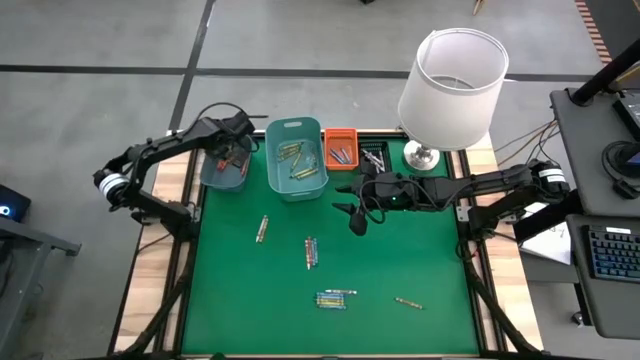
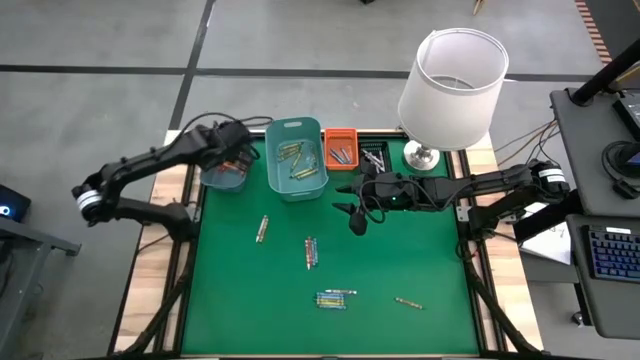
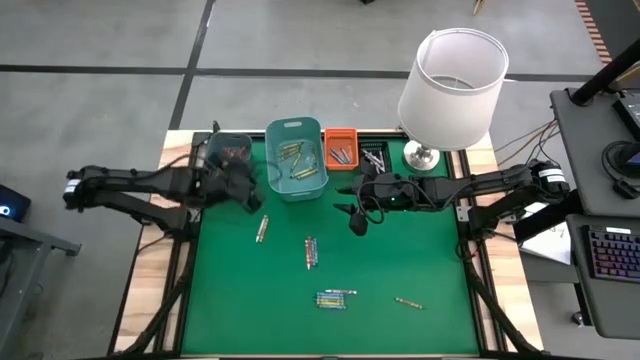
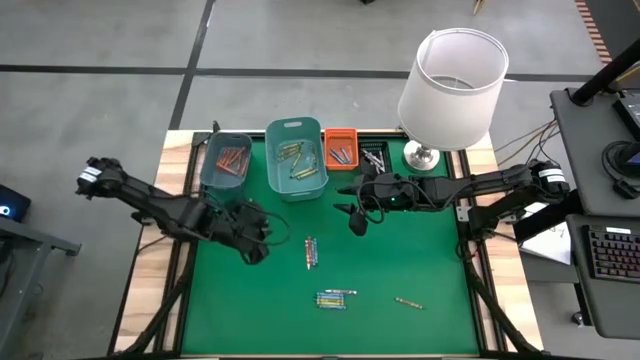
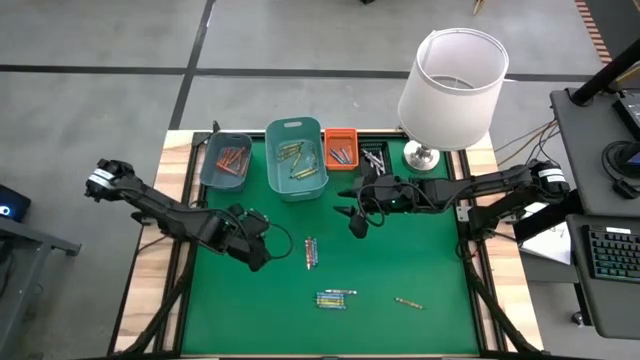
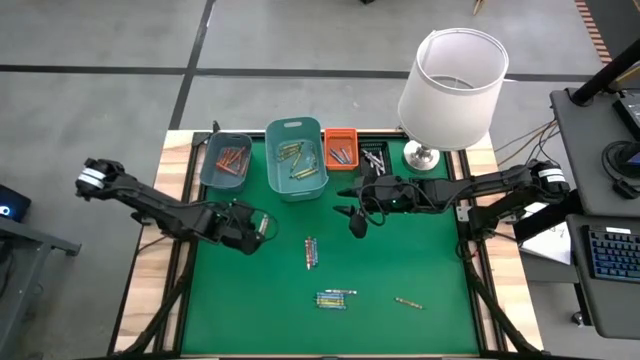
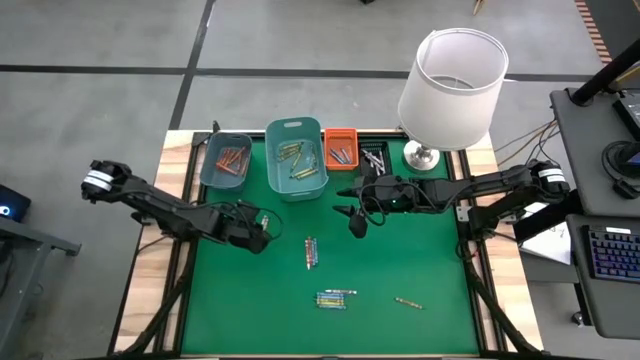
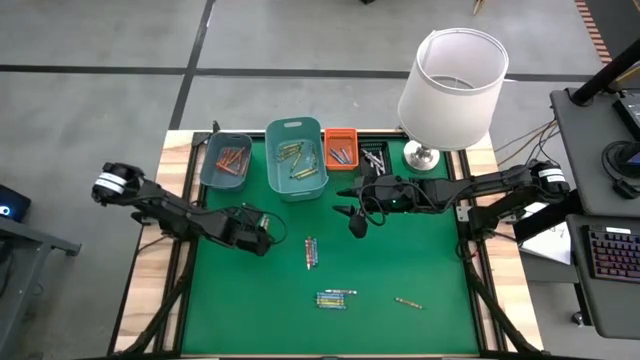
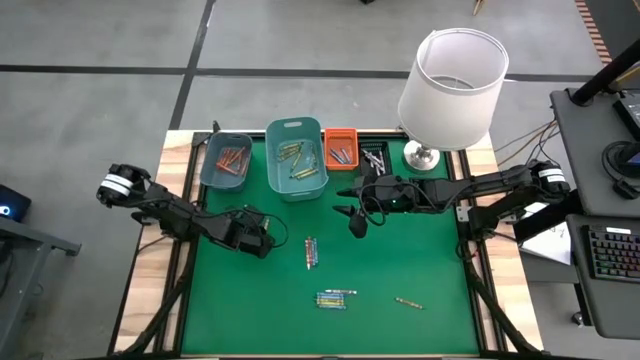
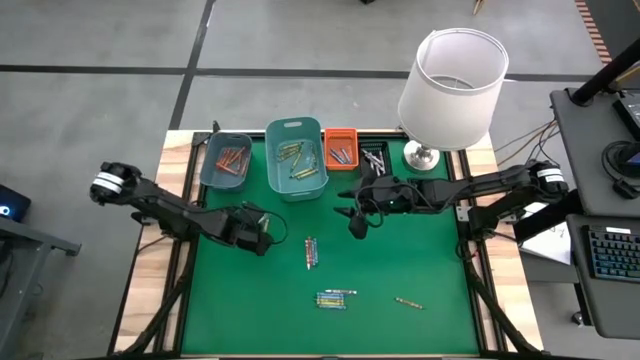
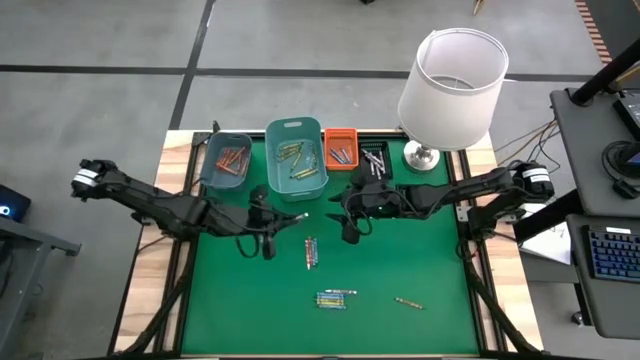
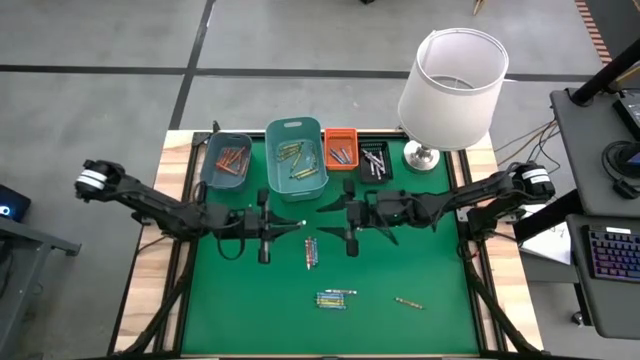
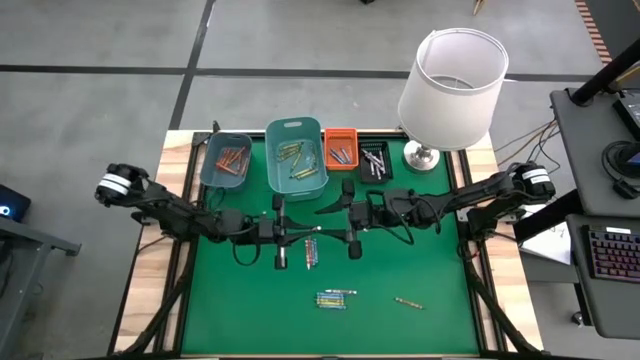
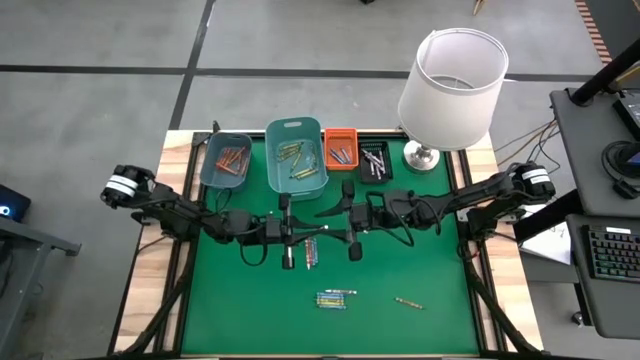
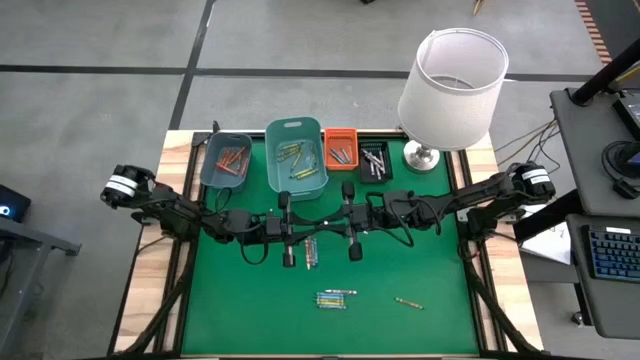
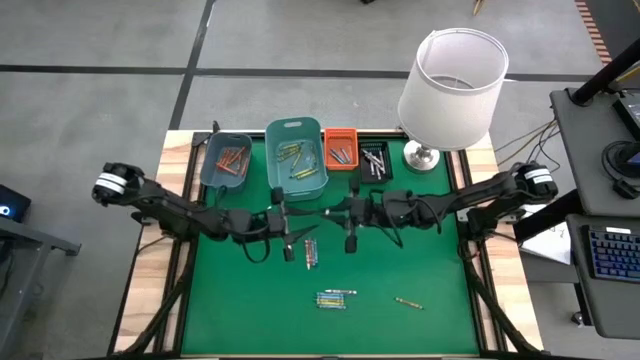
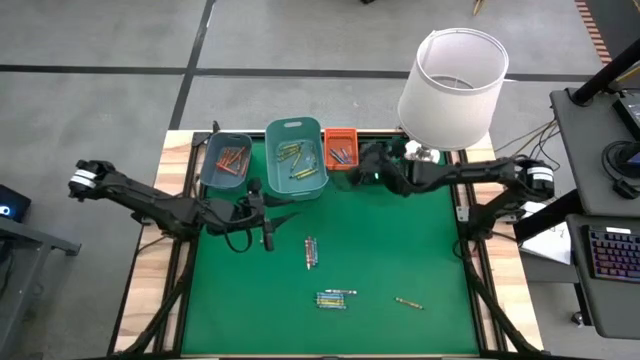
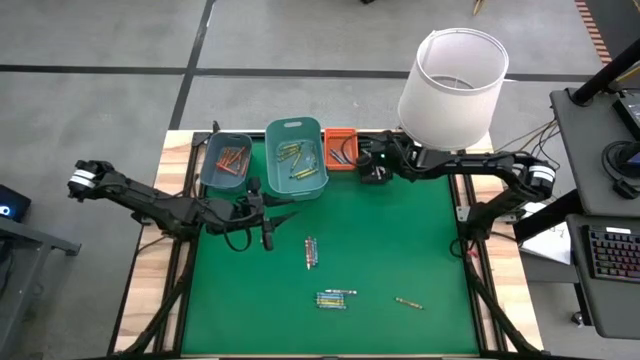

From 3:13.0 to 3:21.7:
Task: Sort crayons
Put the white crayon into the black bin

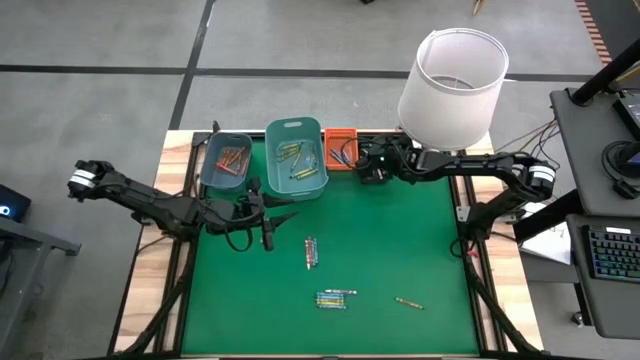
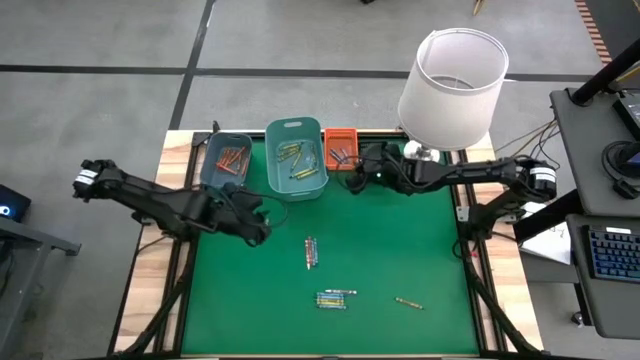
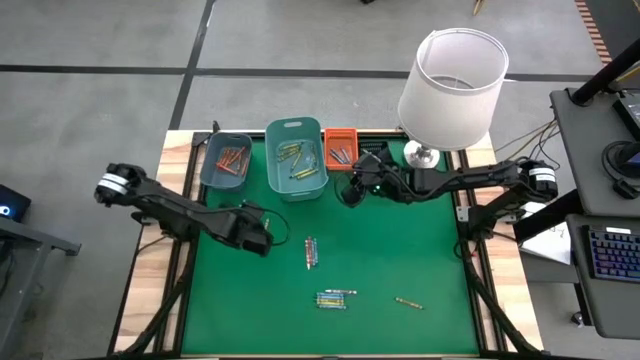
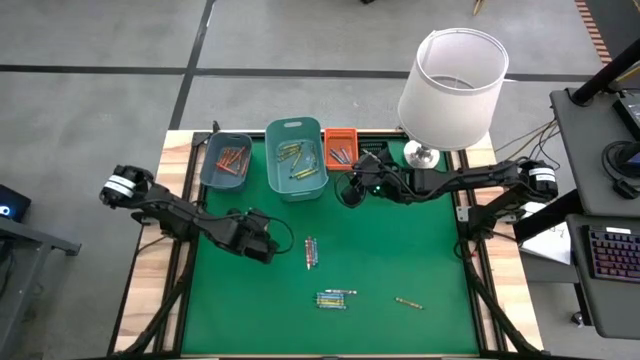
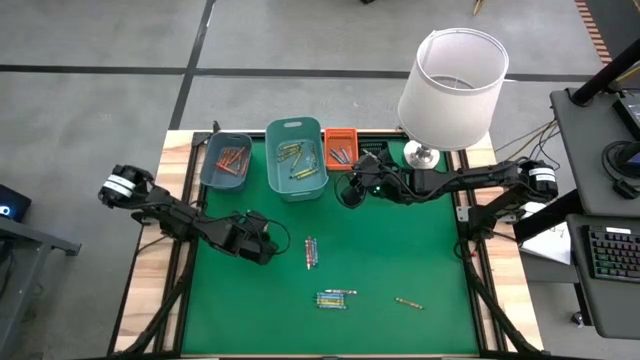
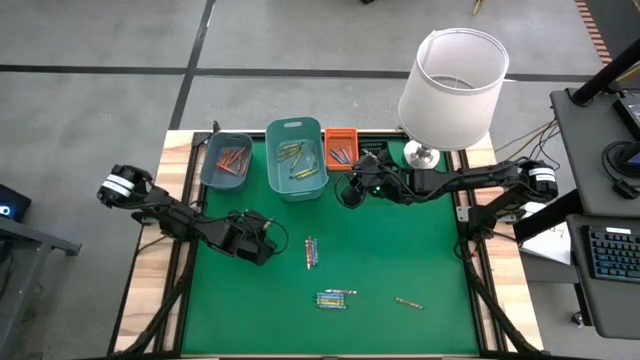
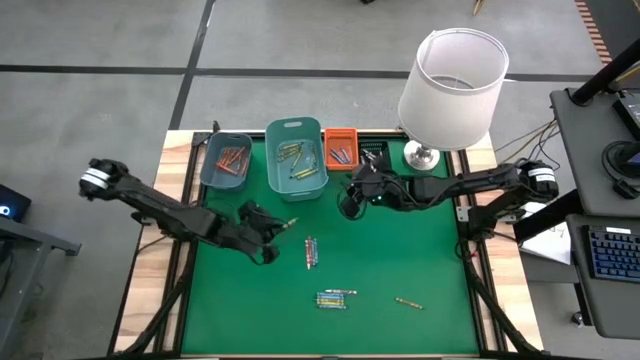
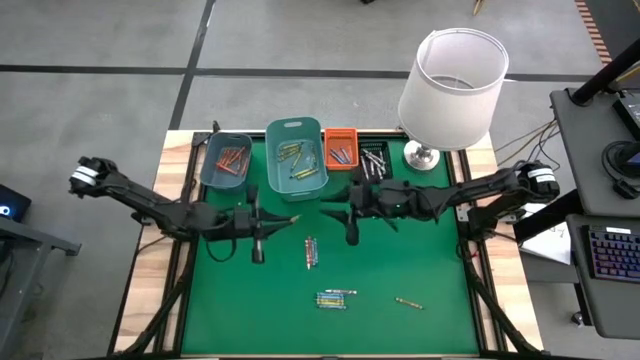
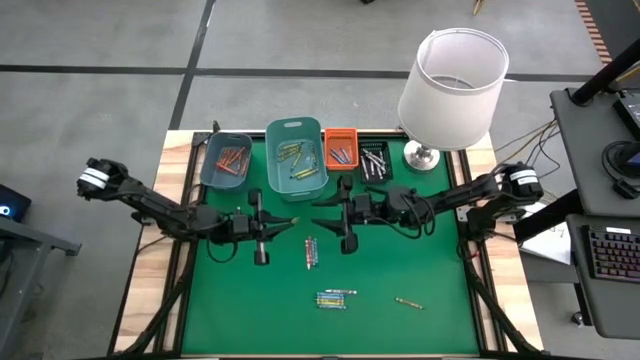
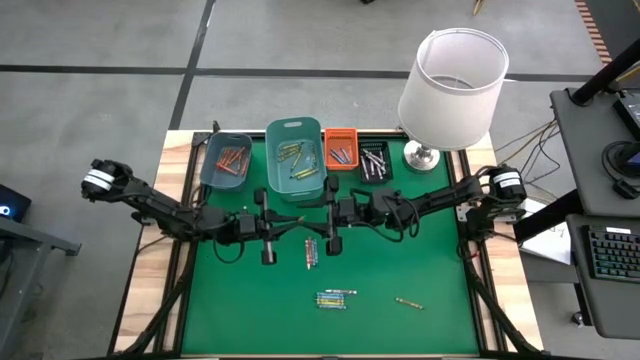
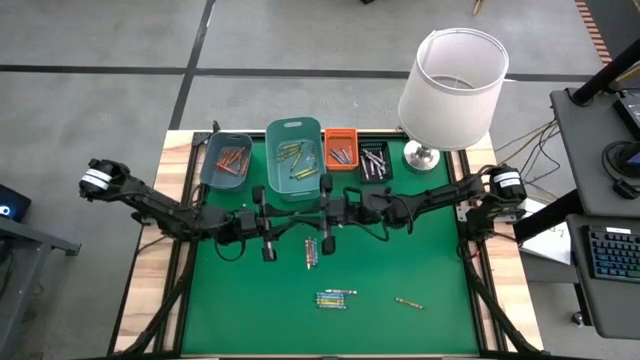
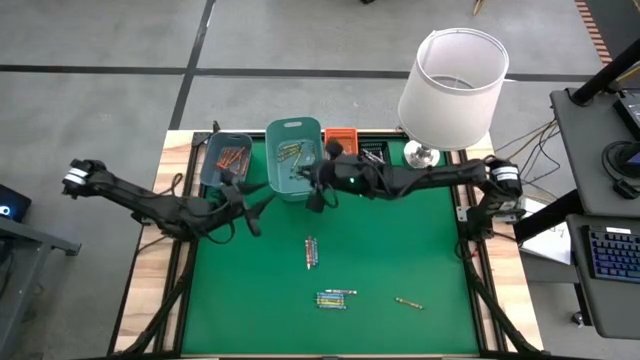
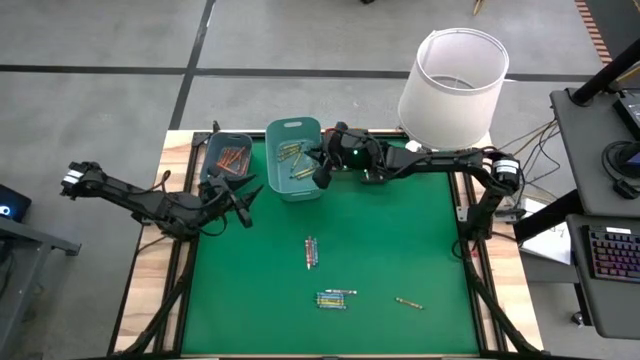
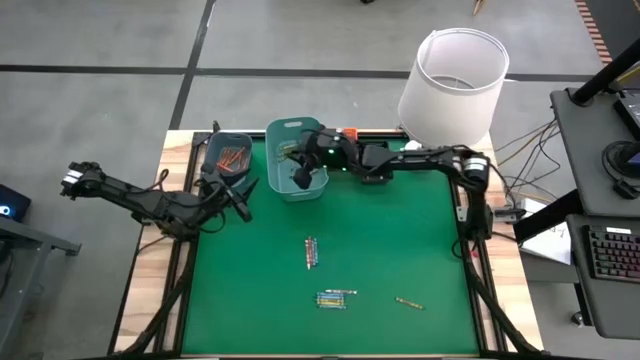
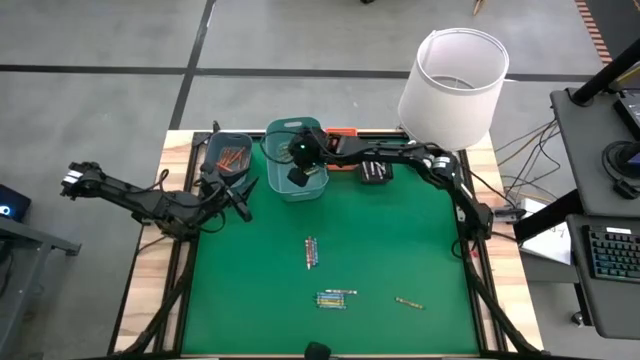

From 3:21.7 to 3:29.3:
Put the green crayon into the green bin

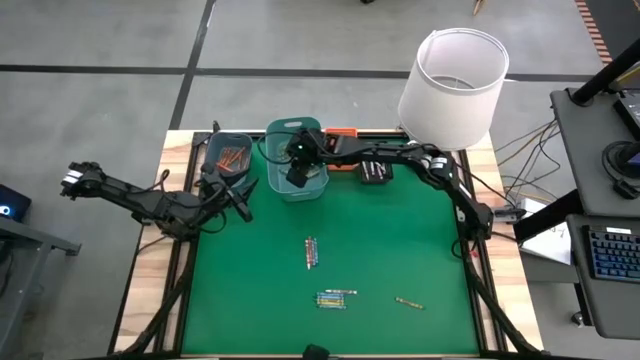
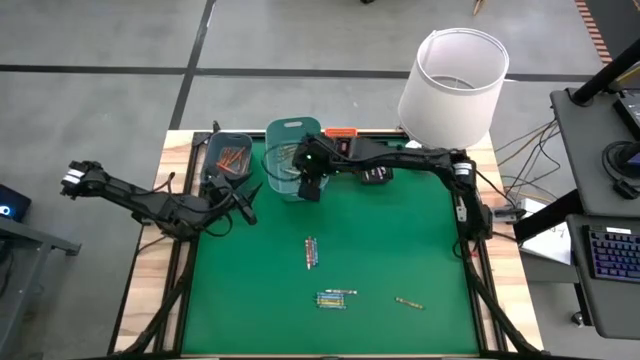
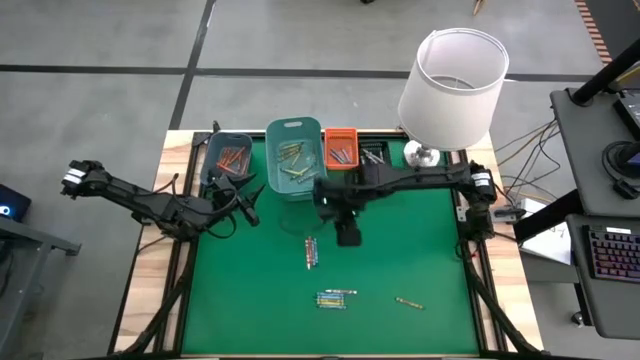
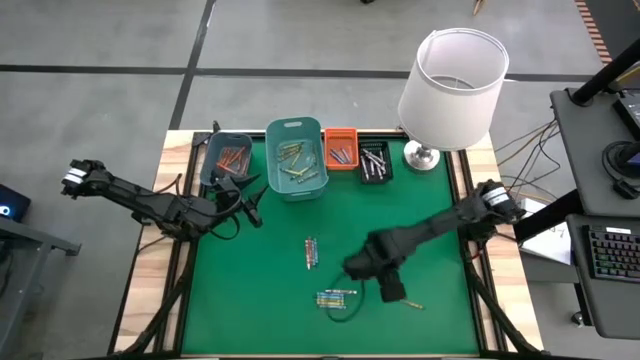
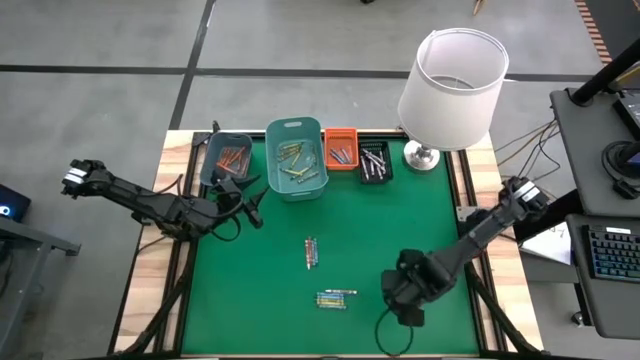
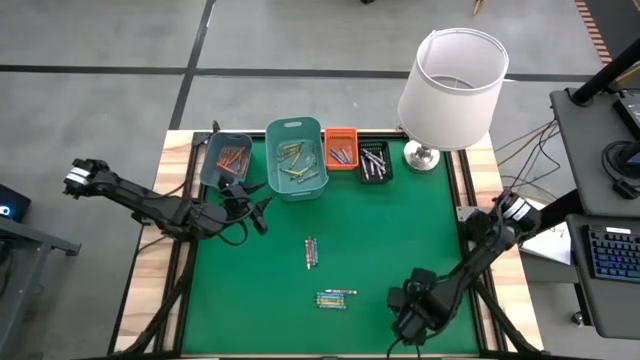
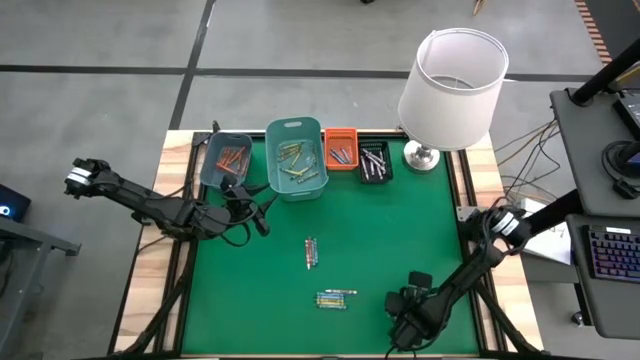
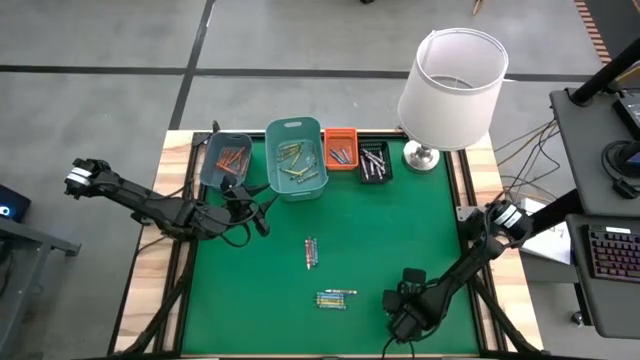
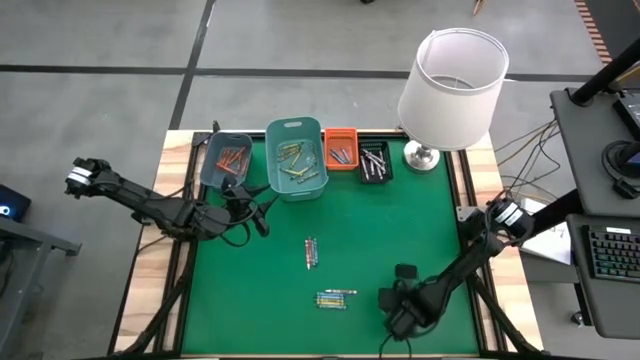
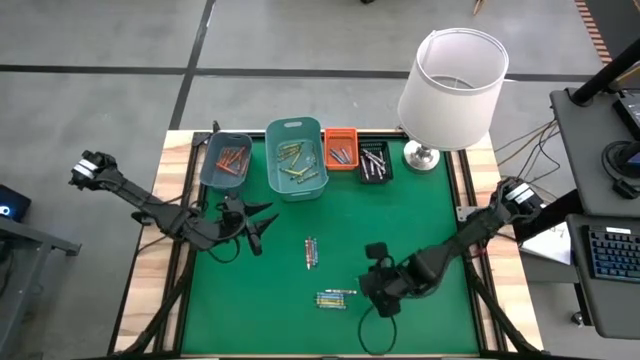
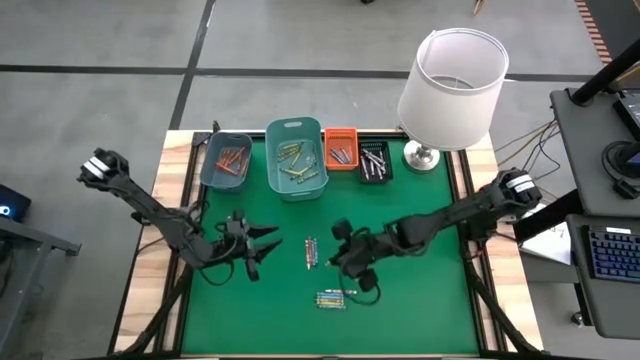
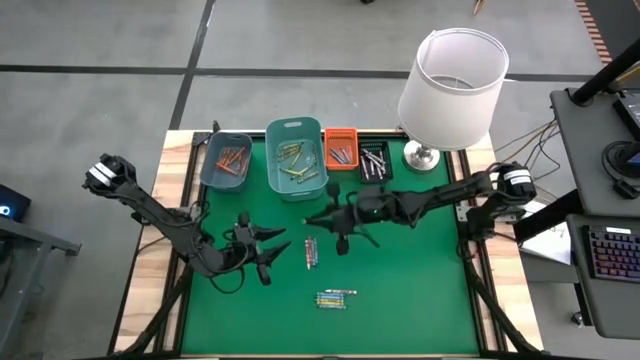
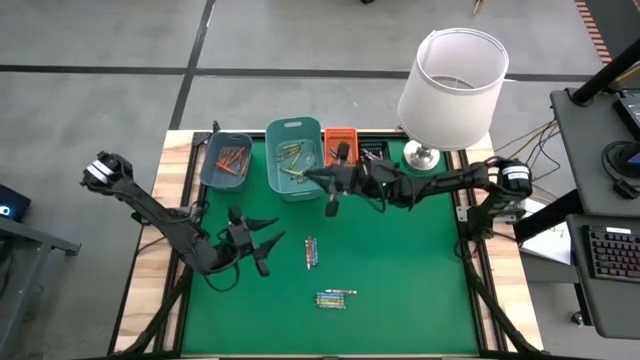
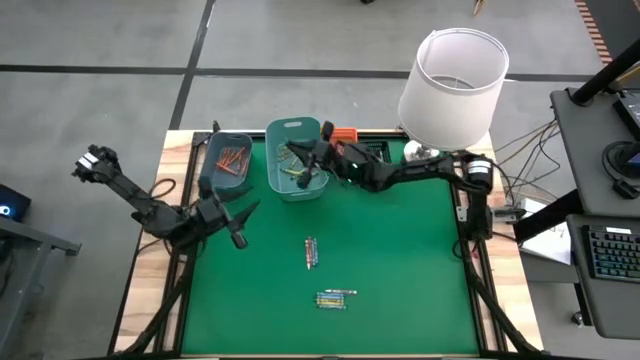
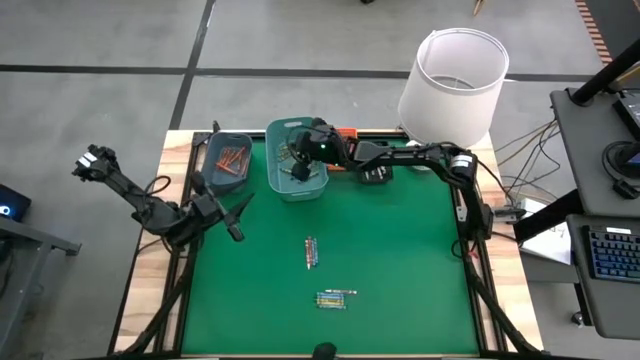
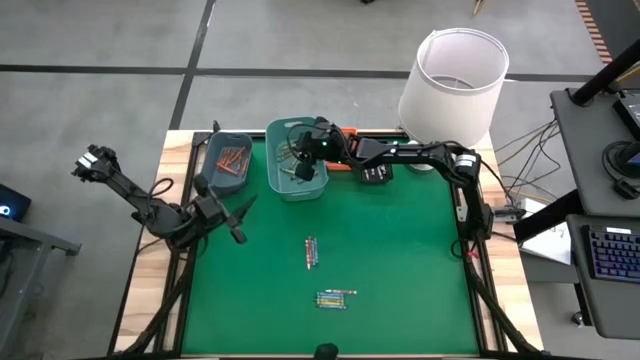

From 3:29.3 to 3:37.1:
Put the green crayon into the green bin
